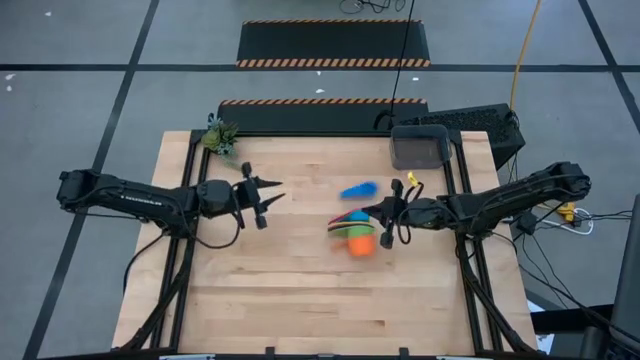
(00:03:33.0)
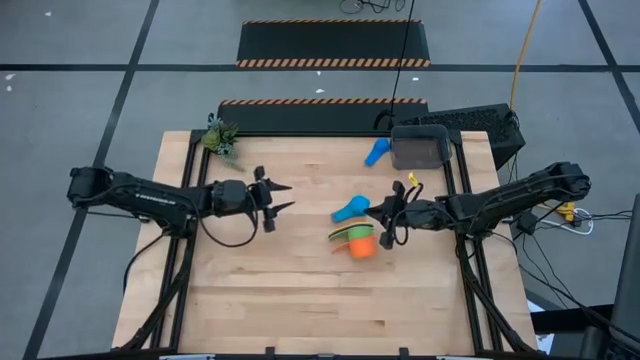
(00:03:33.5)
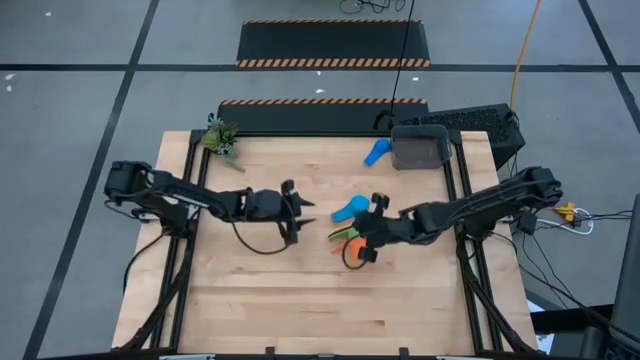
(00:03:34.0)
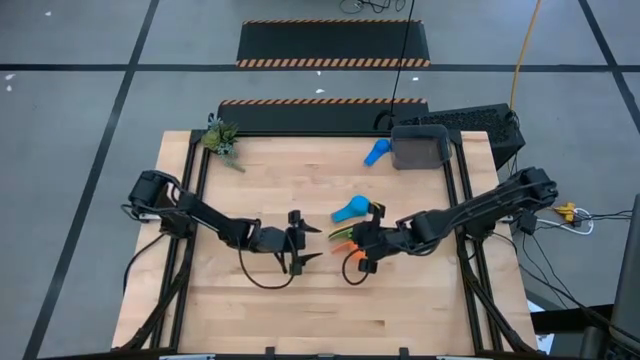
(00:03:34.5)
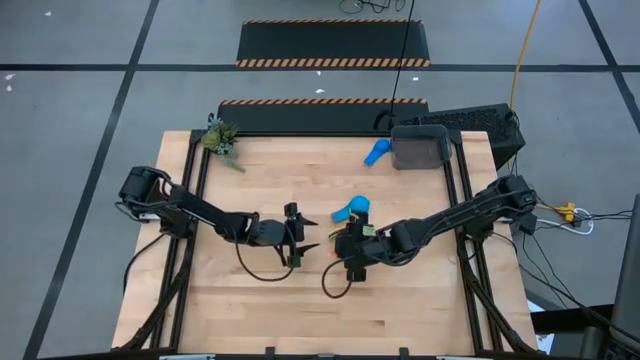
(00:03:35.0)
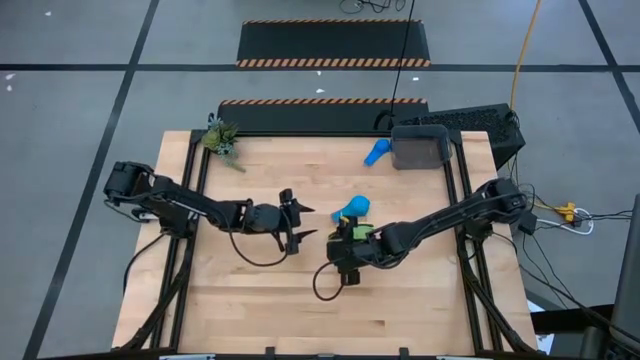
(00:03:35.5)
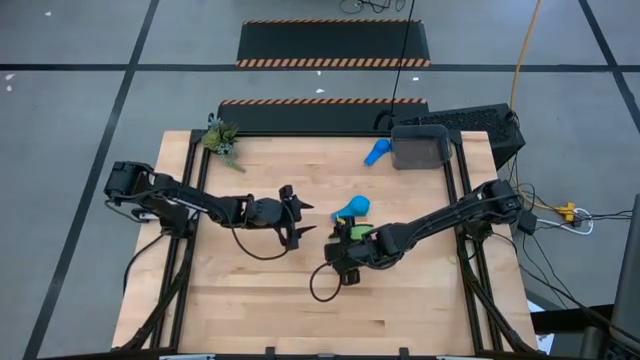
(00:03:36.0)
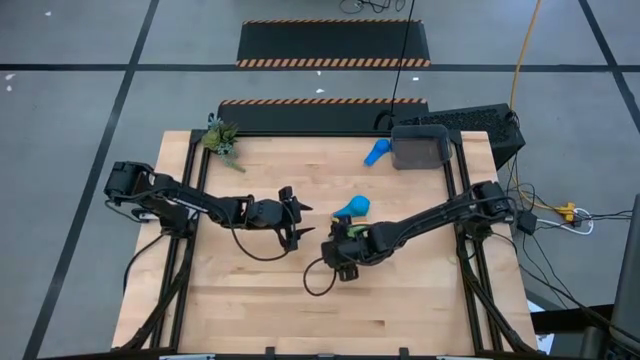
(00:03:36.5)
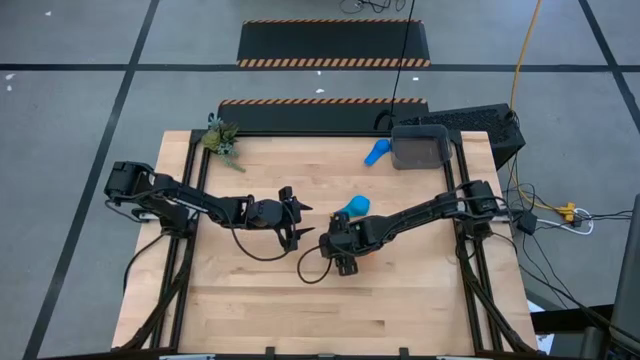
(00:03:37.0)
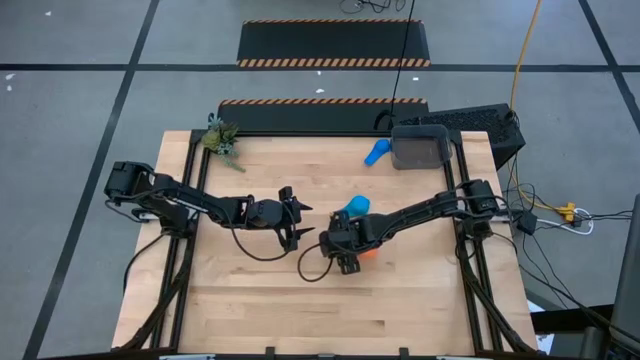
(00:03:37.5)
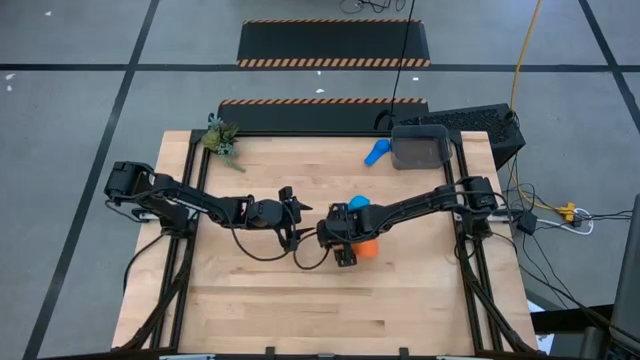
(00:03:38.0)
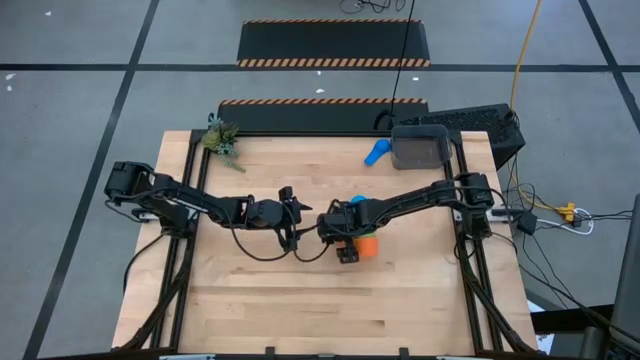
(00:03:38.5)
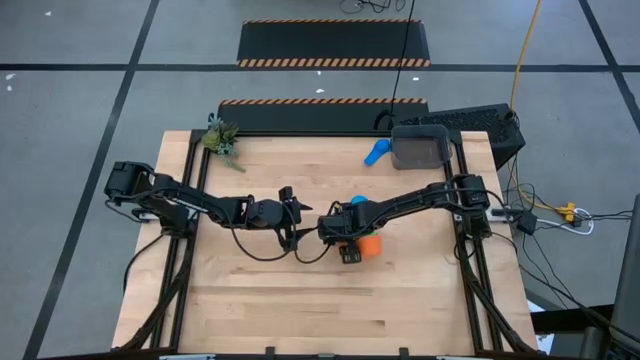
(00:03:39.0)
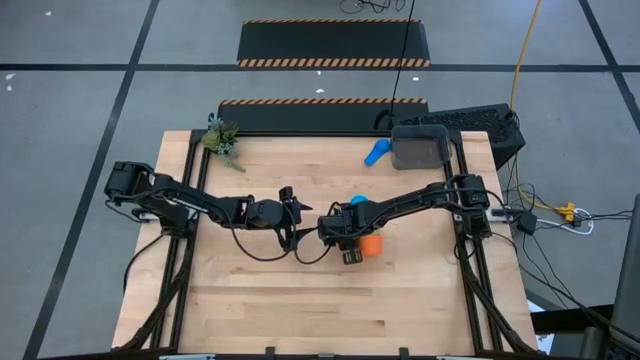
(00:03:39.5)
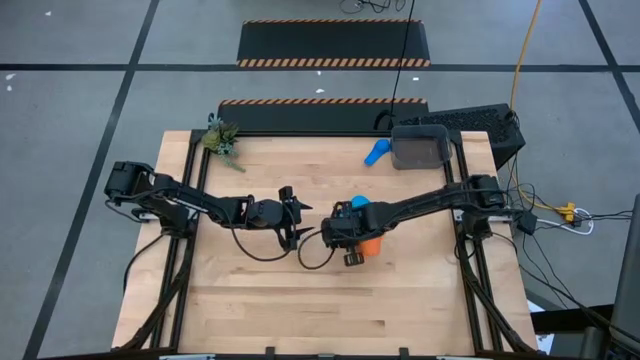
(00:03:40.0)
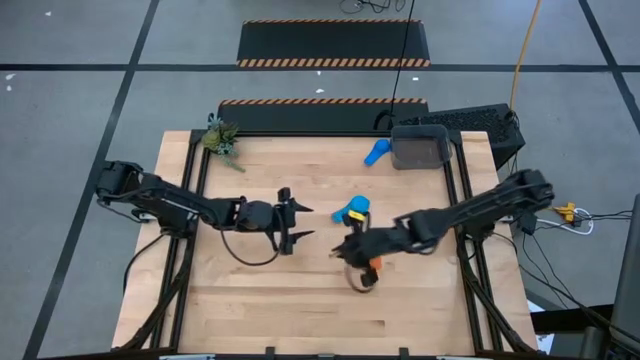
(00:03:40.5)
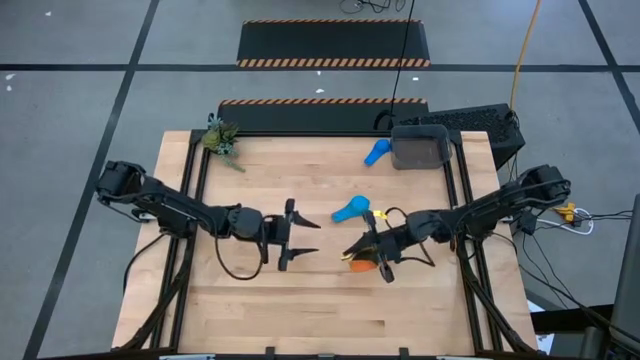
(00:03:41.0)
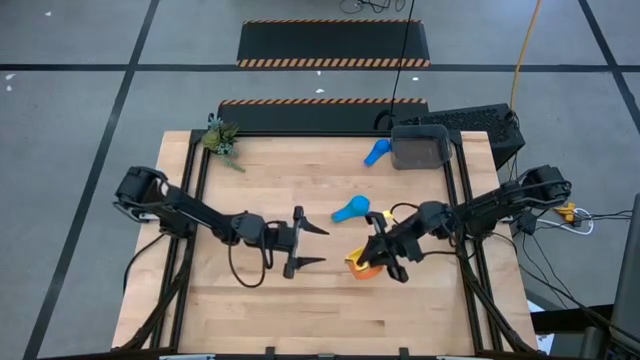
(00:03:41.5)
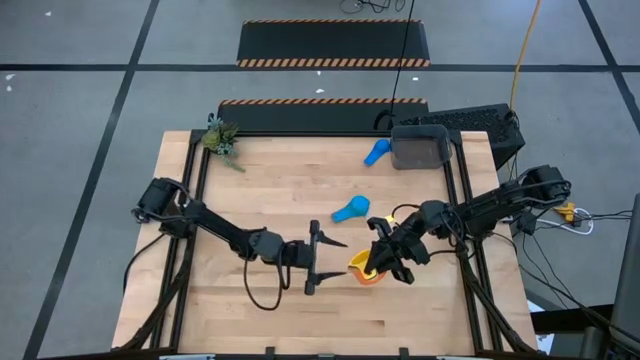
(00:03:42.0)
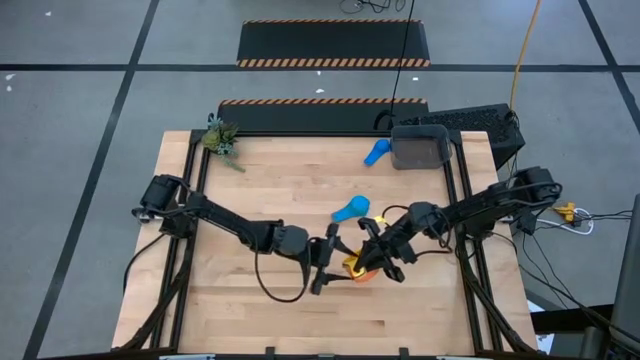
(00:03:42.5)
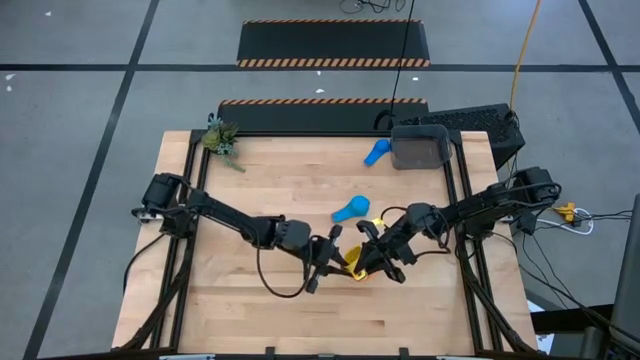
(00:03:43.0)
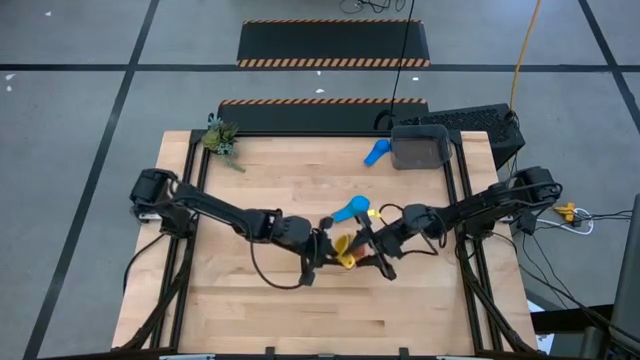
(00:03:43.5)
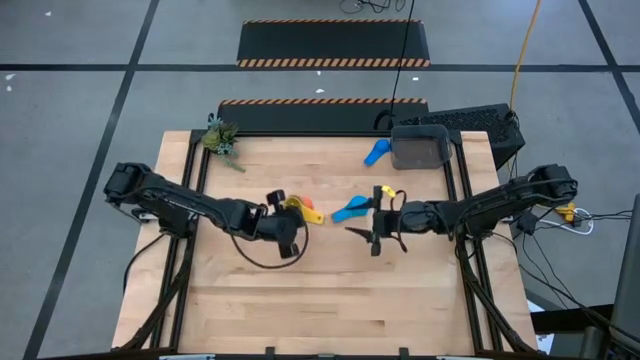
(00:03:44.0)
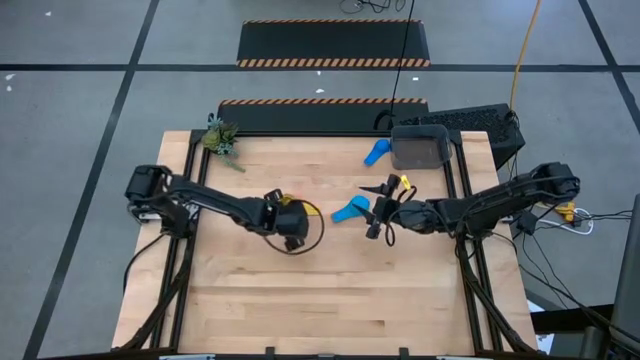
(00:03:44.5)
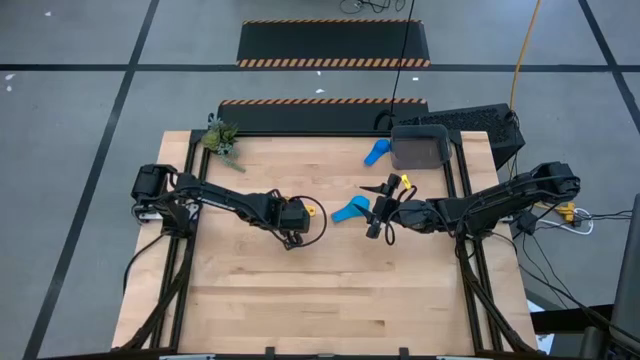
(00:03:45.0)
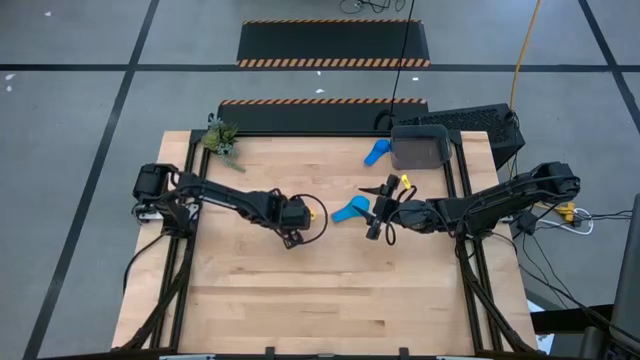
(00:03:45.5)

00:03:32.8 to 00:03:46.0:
Task: Nest measuring cups in basket
Adjust the stack of measuring cups

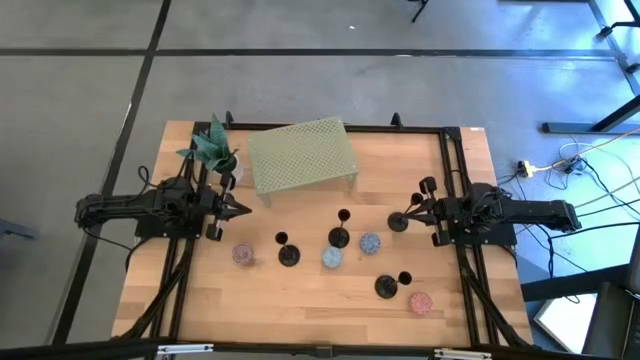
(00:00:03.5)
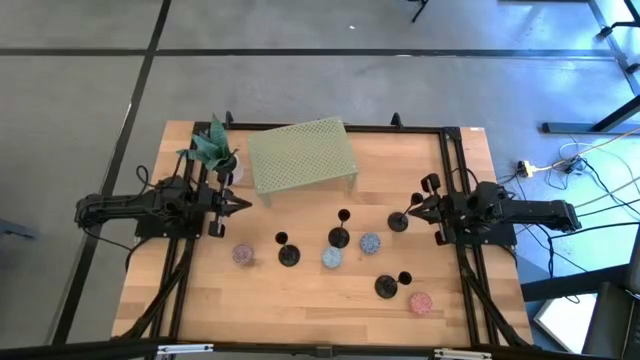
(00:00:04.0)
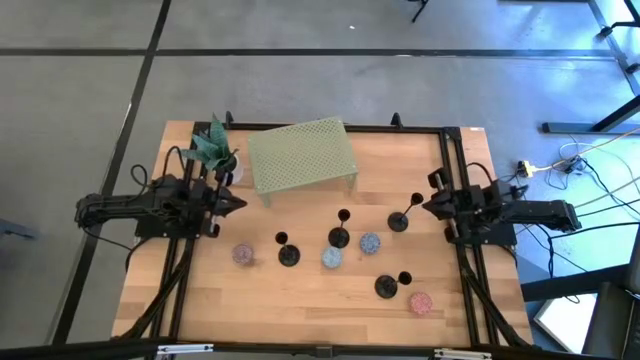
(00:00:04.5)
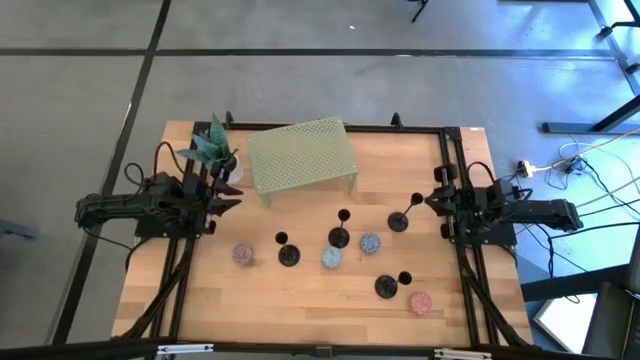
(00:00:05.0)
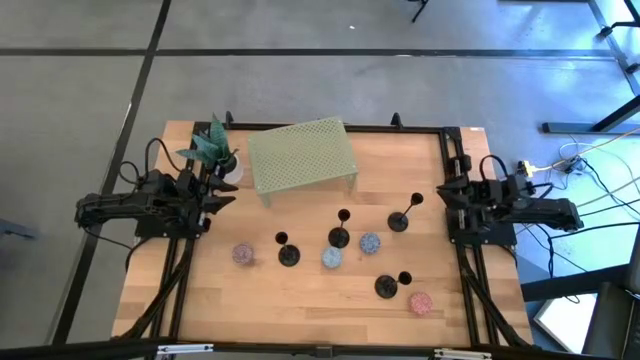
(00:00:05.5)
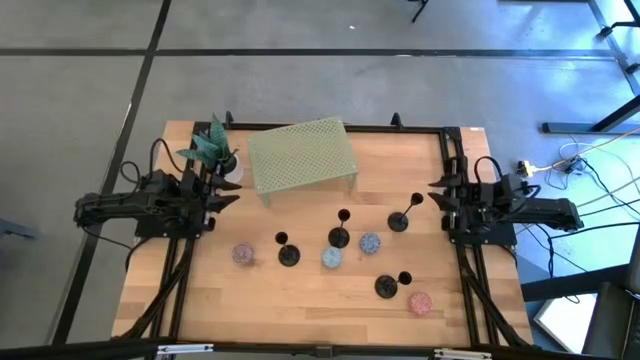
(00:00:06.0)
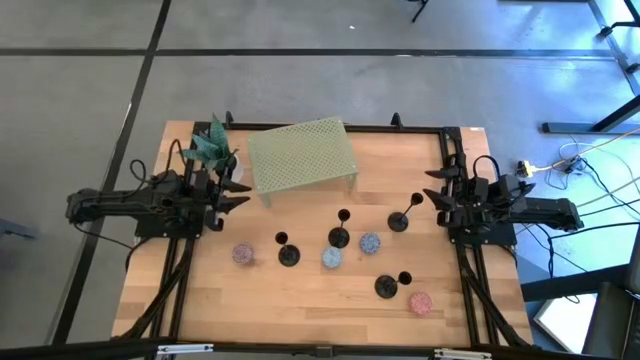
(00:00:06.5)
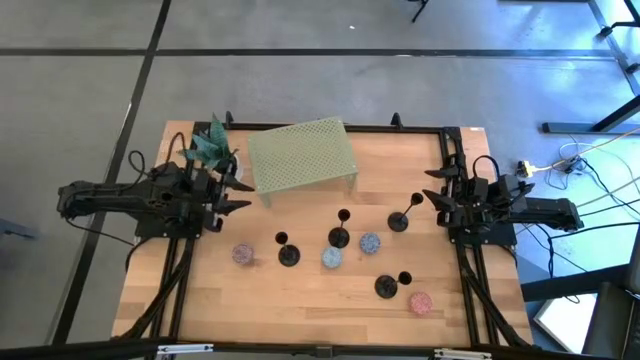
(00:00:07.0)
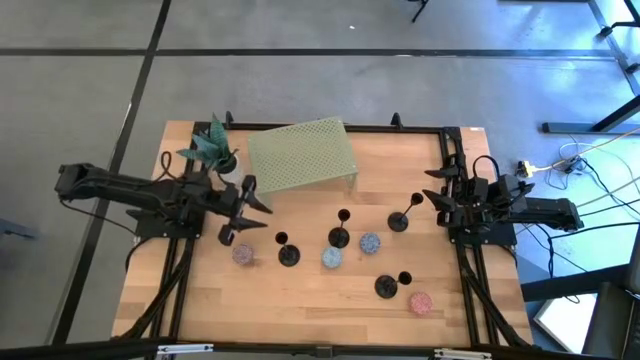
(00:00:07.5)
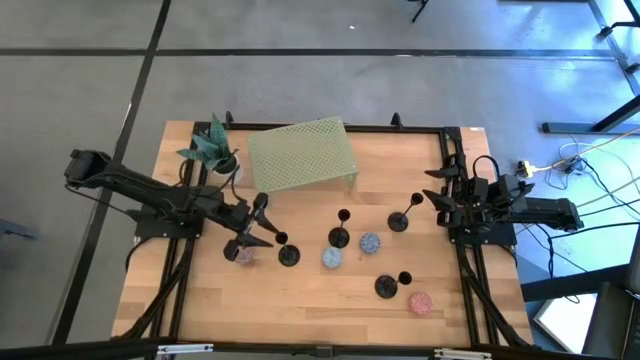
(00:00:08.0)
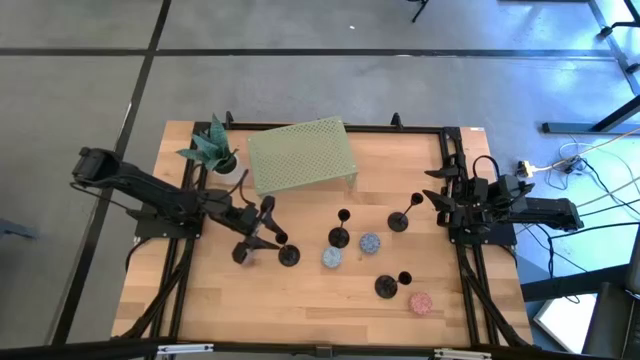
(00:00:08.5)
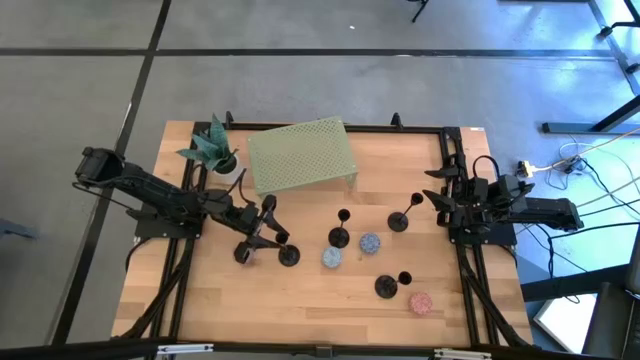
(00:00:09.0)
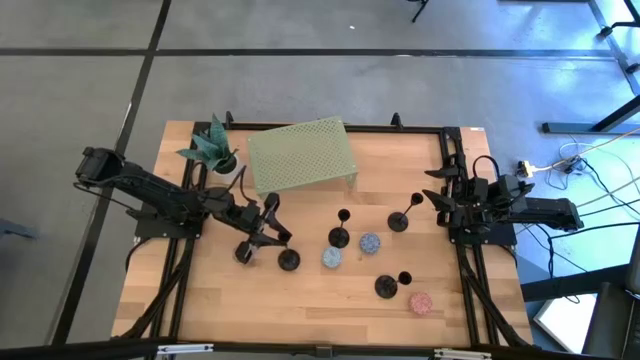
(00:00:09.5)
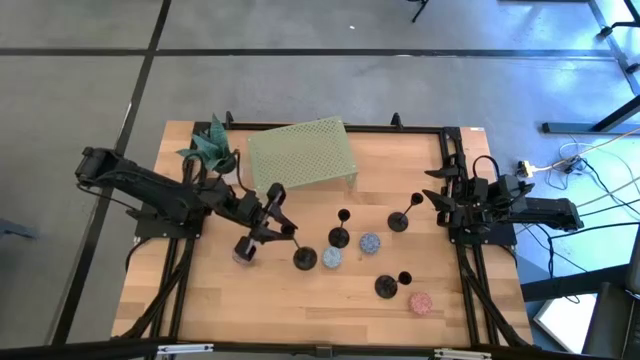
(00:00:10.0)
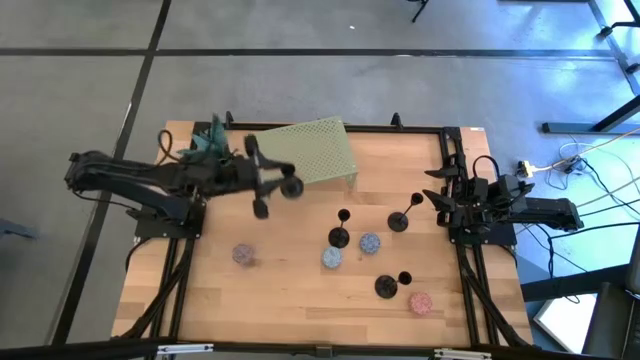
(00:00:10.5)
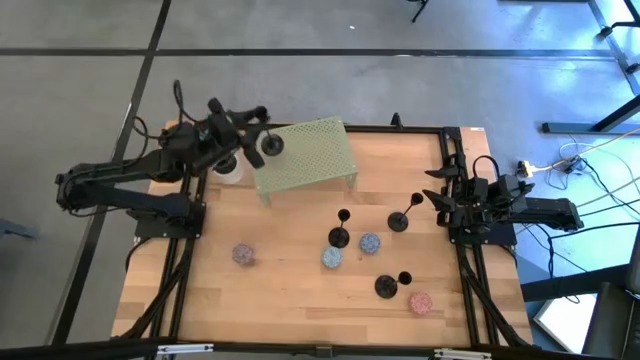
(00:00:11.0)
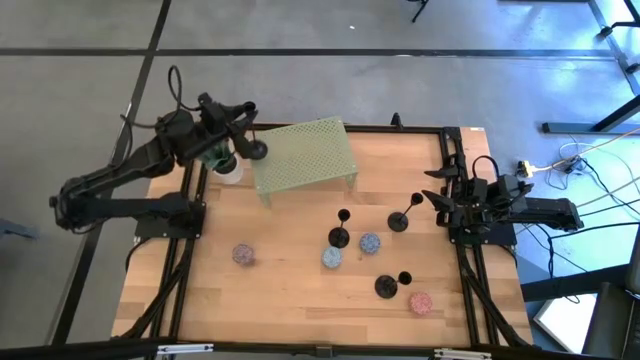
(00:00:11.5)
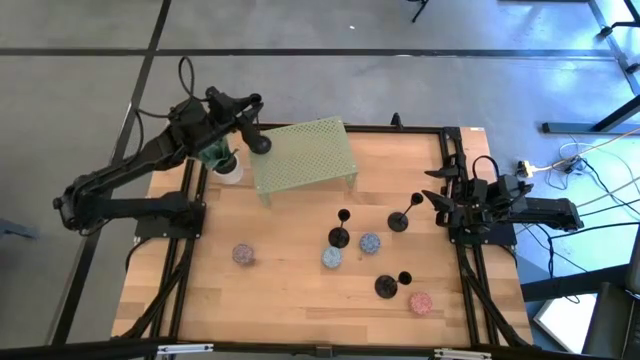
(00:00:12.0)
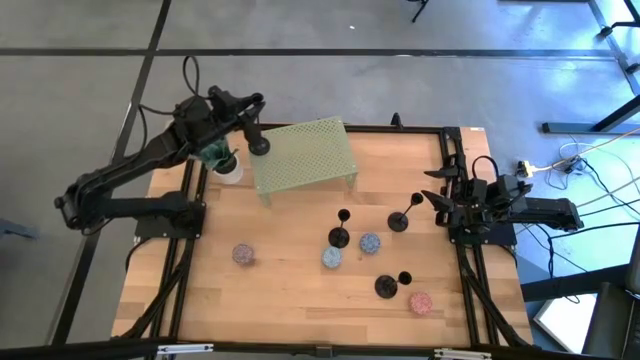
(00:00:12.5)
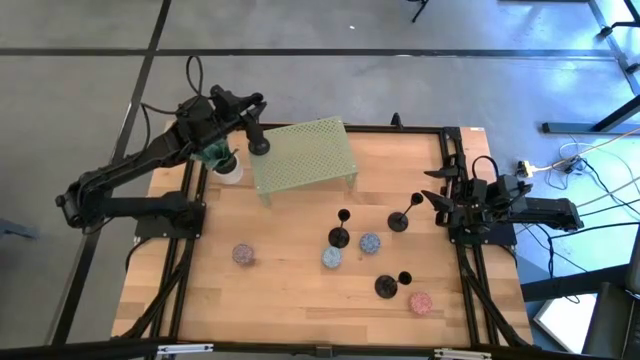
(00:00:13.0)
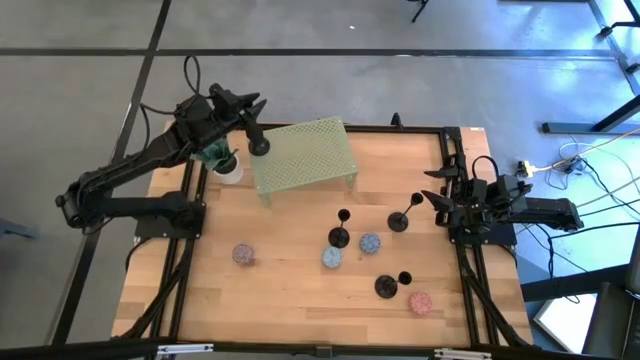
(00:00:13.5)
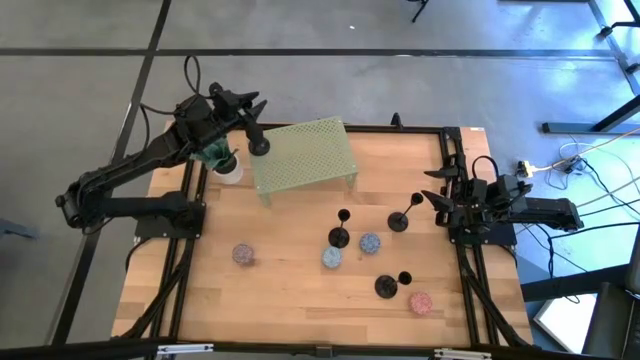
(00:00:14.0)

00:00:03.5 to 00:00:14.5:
Task: Pick & Place candle stick holders
Put the black candle holder on the shelf
